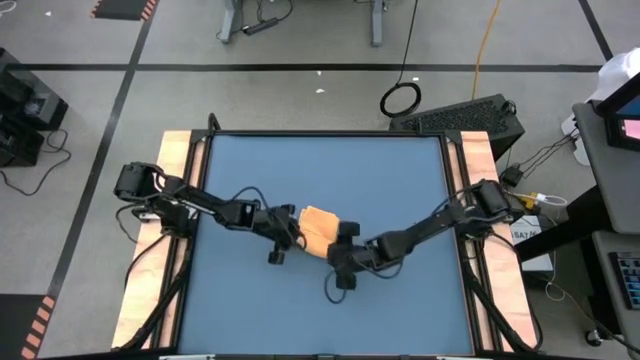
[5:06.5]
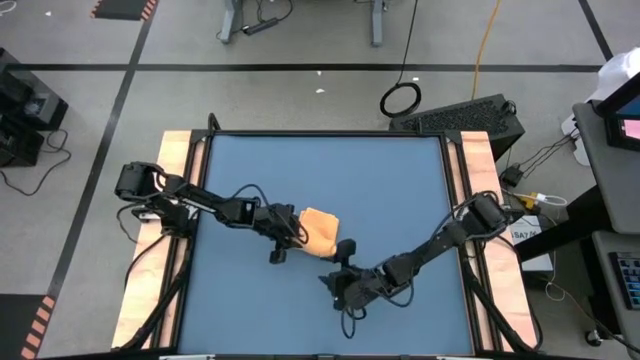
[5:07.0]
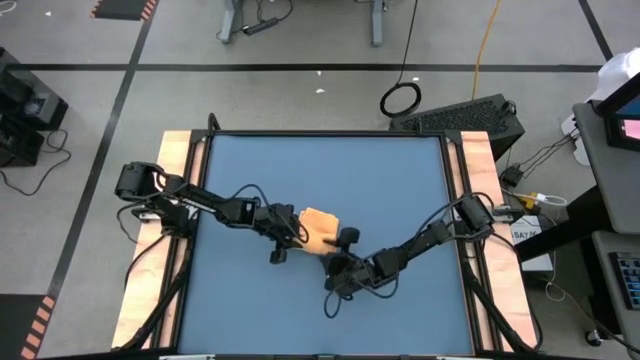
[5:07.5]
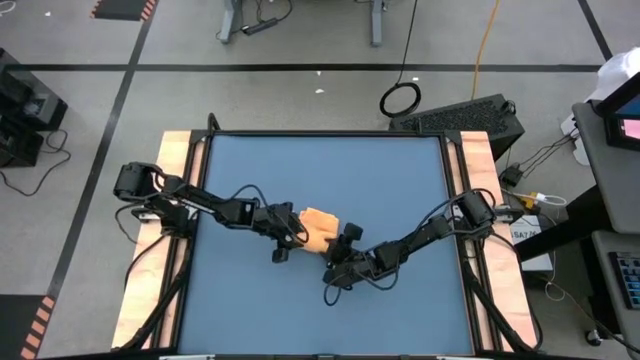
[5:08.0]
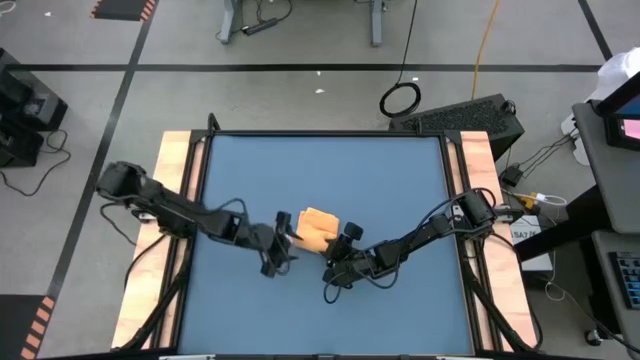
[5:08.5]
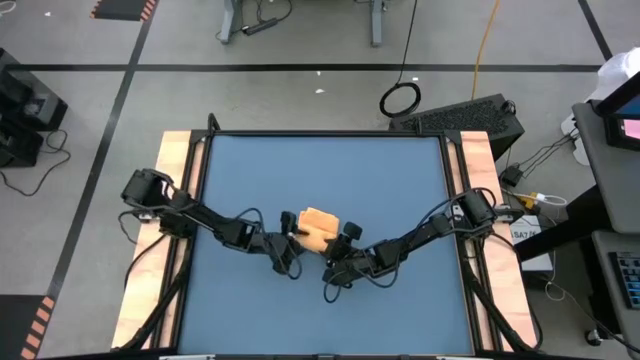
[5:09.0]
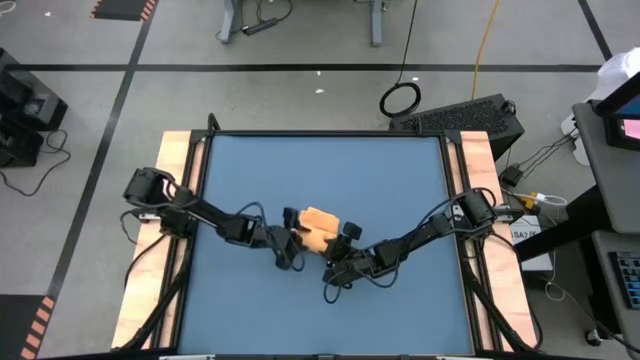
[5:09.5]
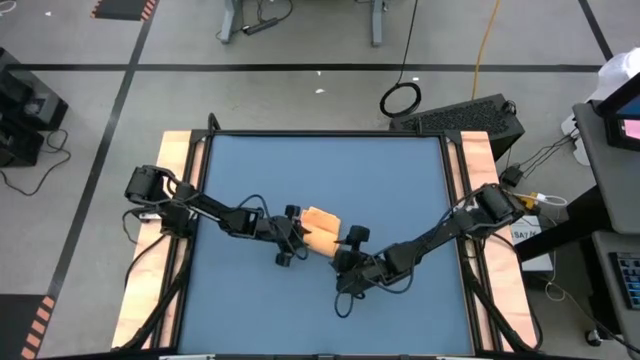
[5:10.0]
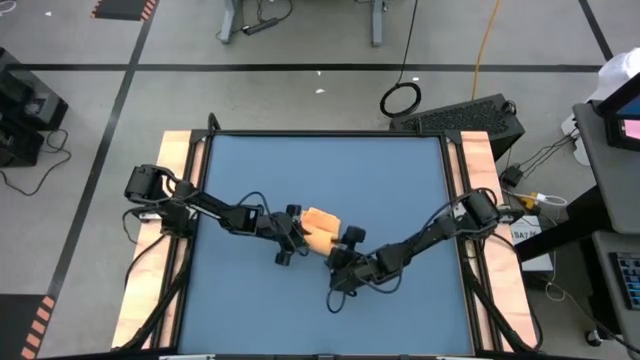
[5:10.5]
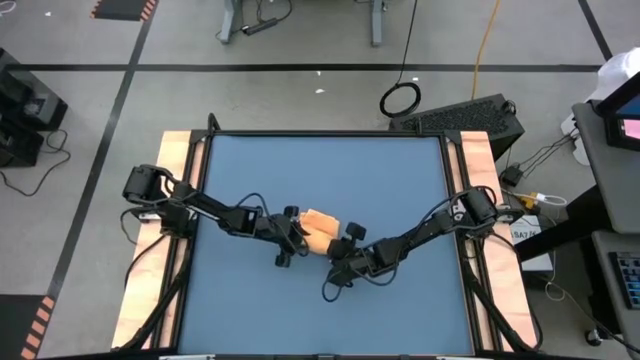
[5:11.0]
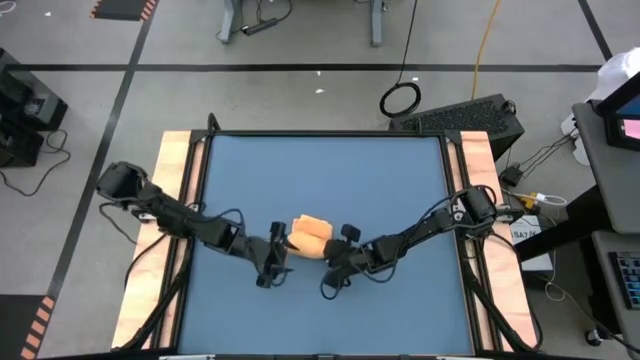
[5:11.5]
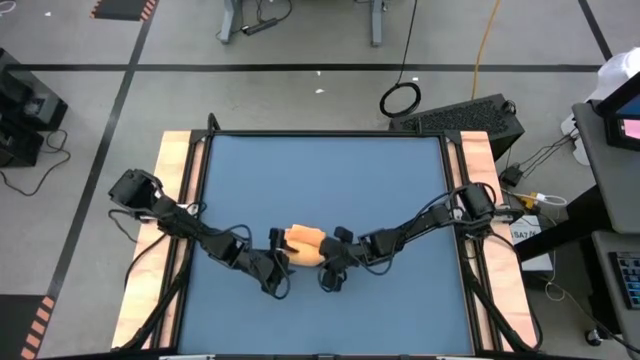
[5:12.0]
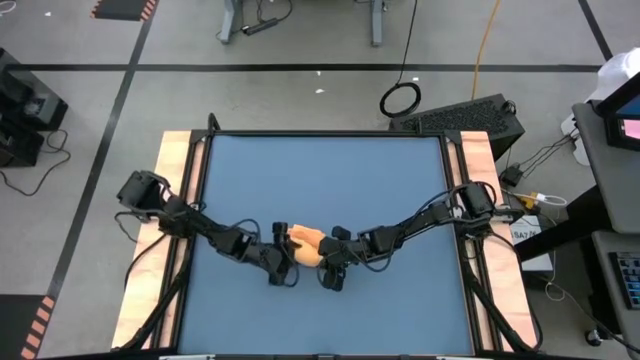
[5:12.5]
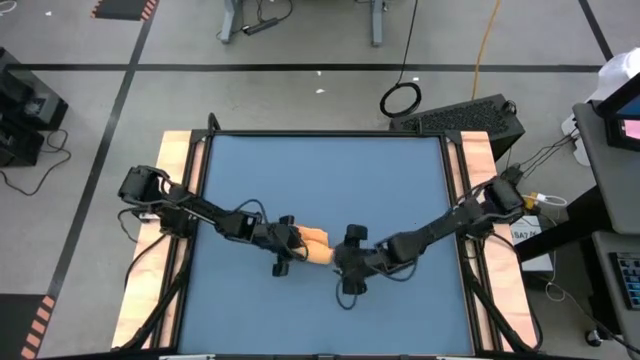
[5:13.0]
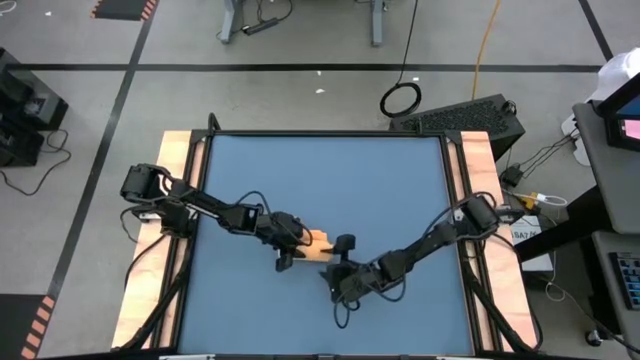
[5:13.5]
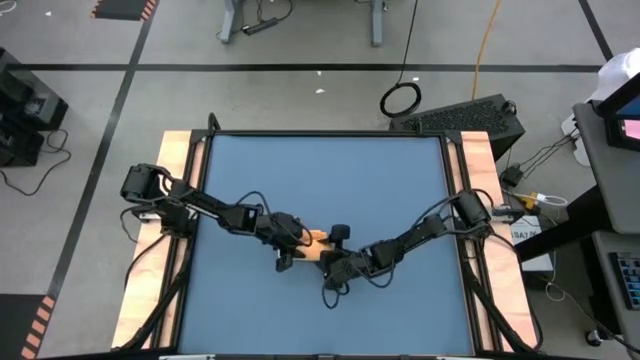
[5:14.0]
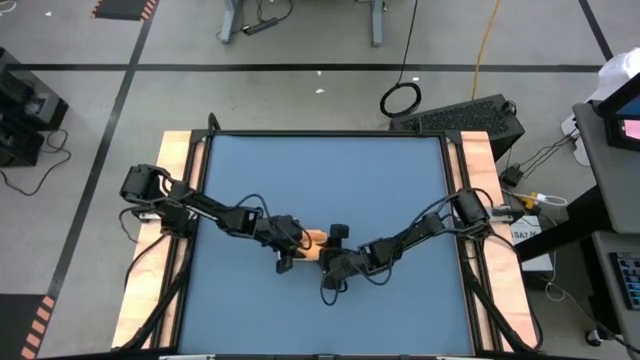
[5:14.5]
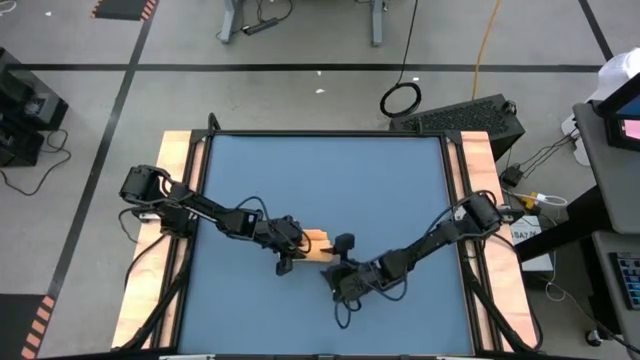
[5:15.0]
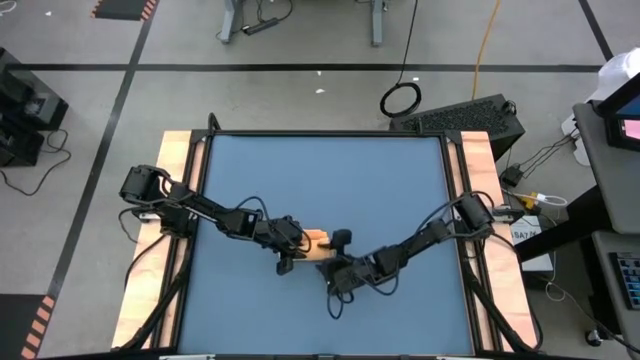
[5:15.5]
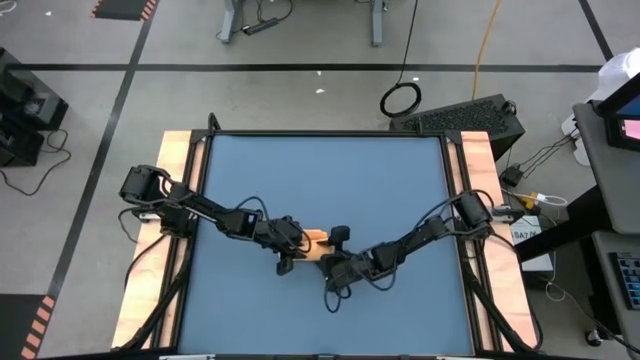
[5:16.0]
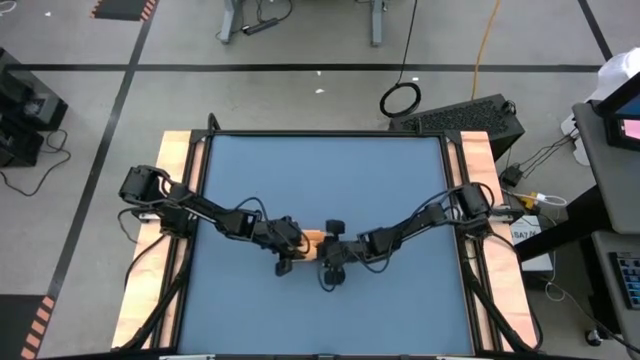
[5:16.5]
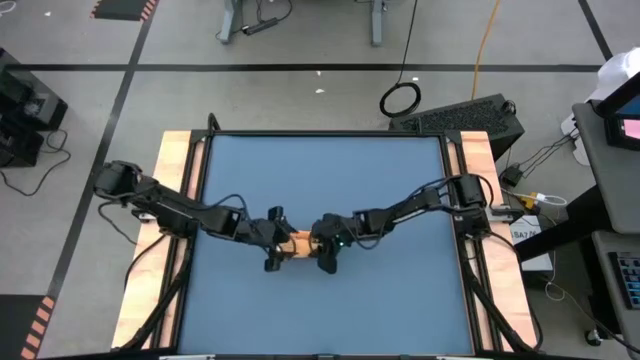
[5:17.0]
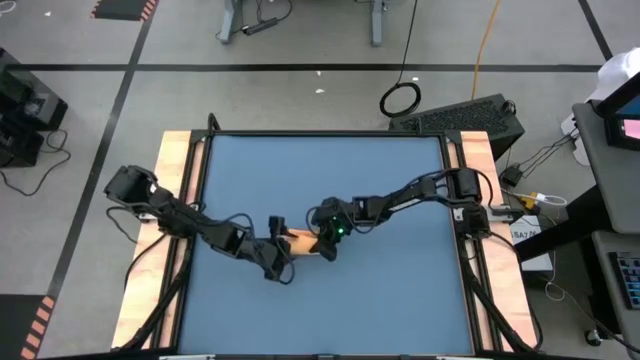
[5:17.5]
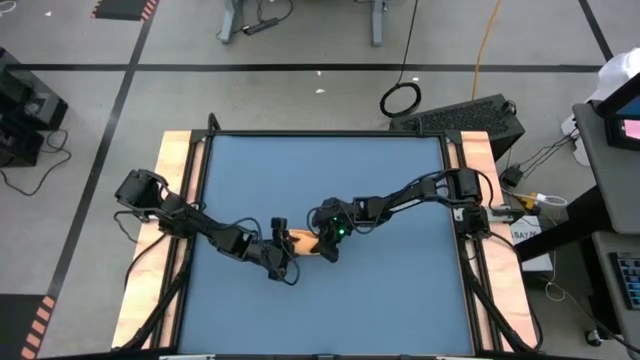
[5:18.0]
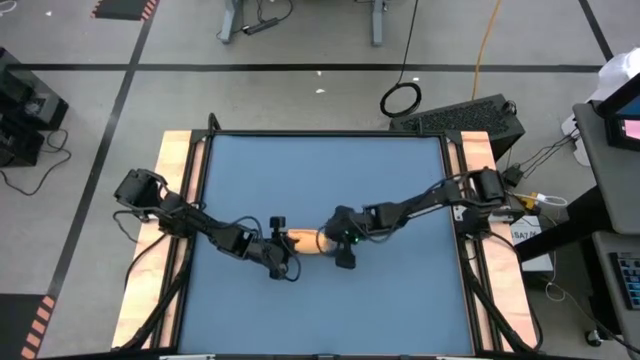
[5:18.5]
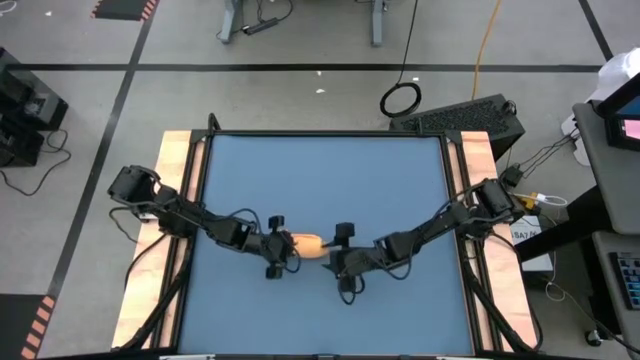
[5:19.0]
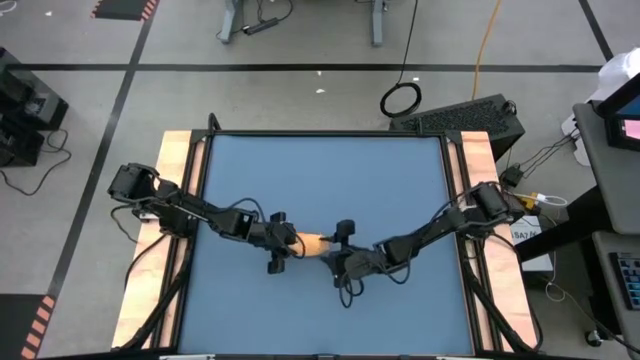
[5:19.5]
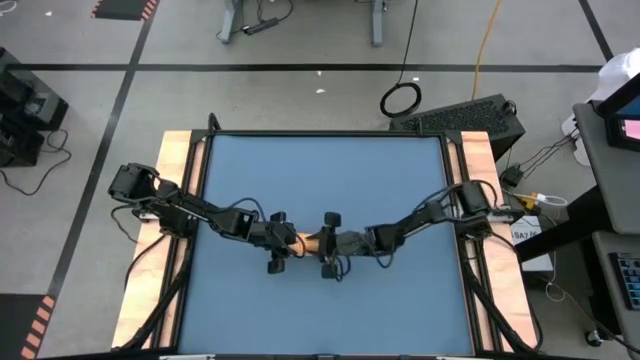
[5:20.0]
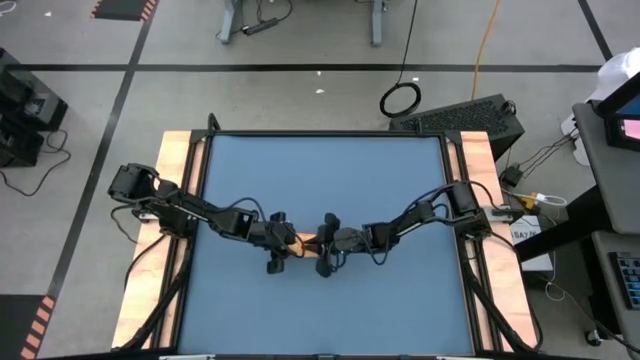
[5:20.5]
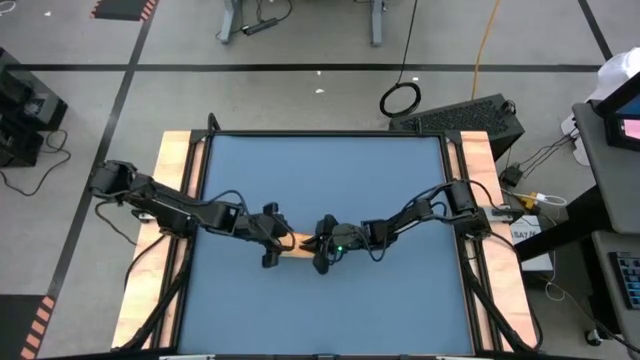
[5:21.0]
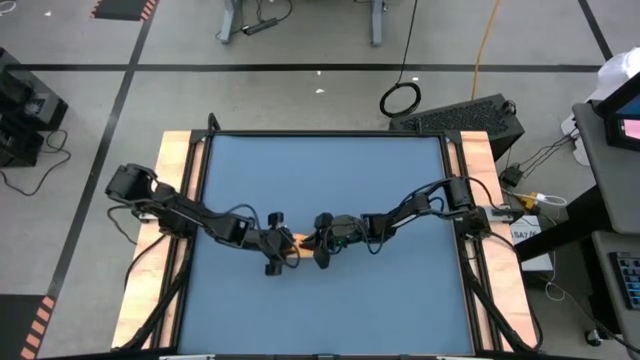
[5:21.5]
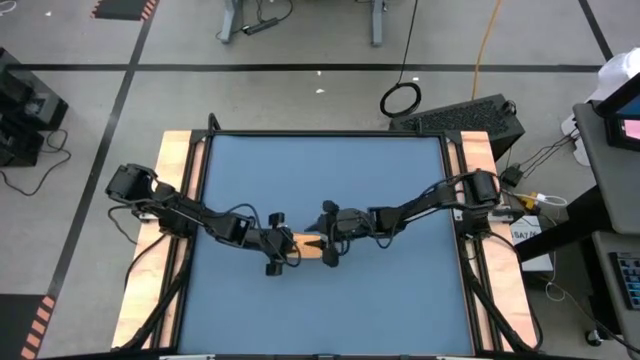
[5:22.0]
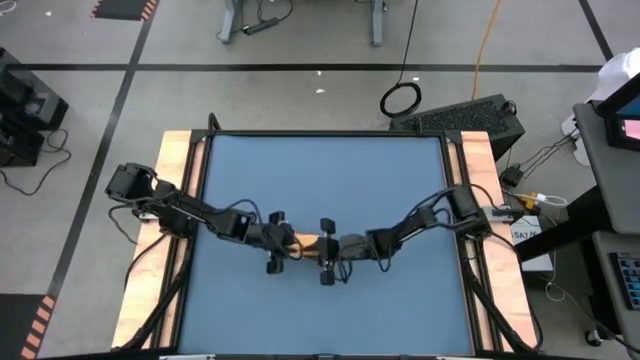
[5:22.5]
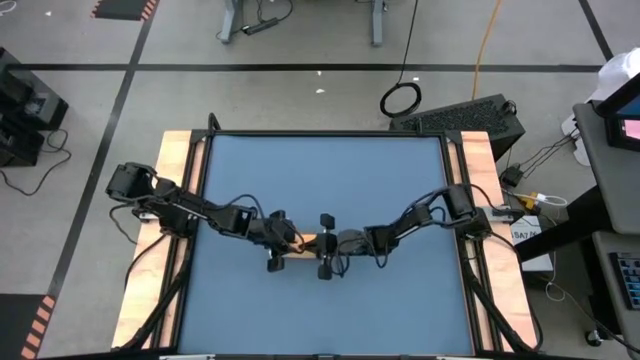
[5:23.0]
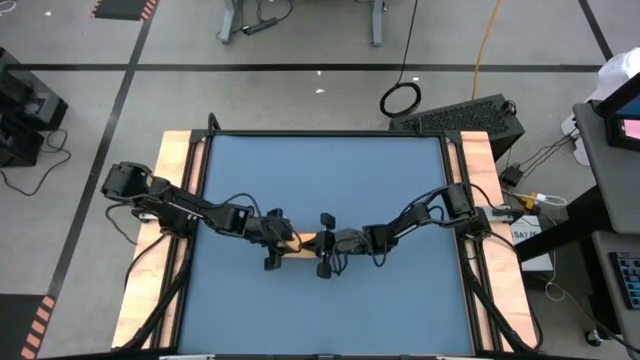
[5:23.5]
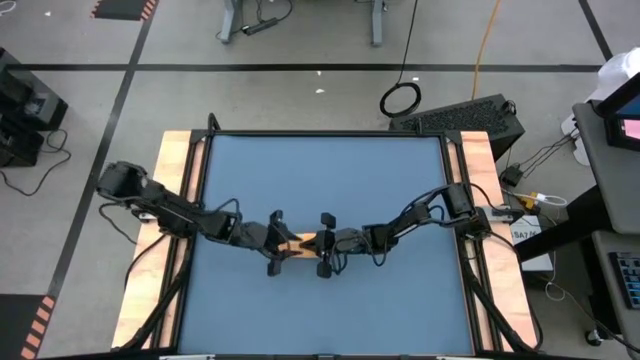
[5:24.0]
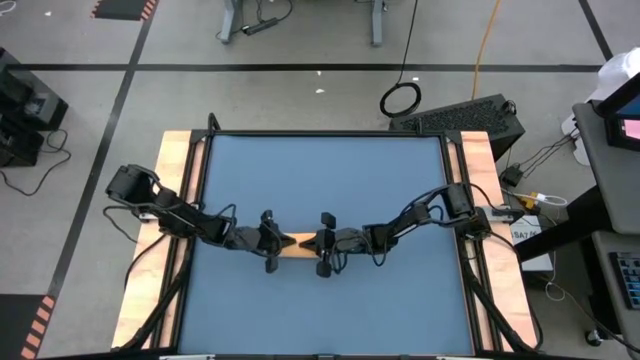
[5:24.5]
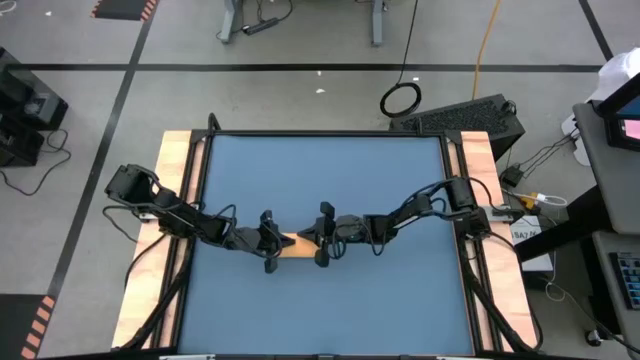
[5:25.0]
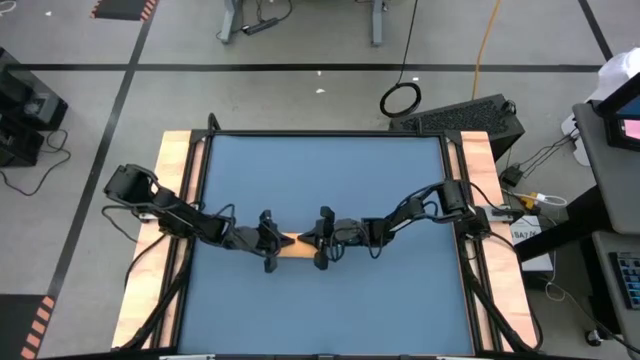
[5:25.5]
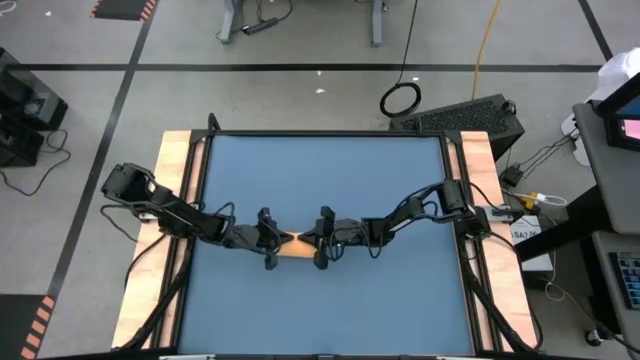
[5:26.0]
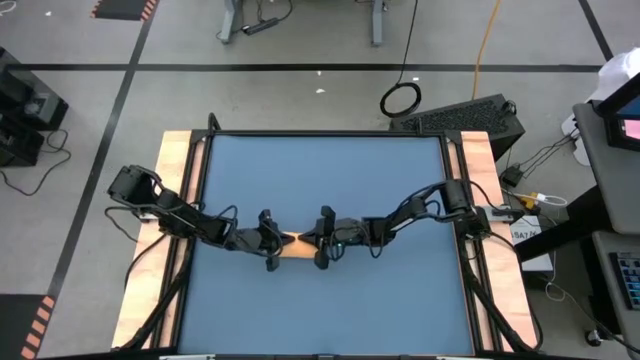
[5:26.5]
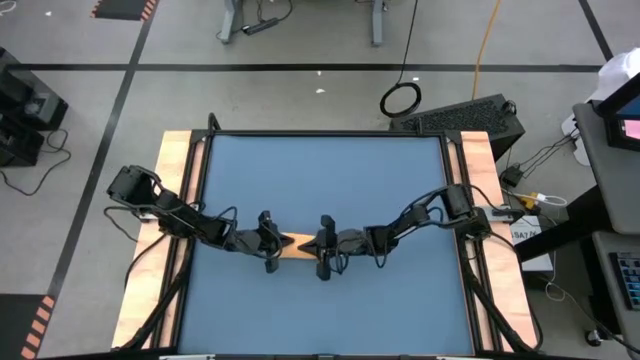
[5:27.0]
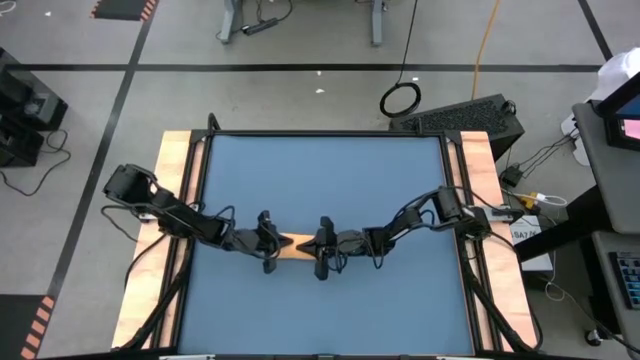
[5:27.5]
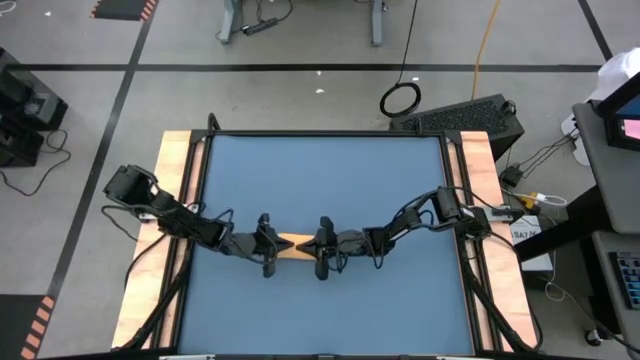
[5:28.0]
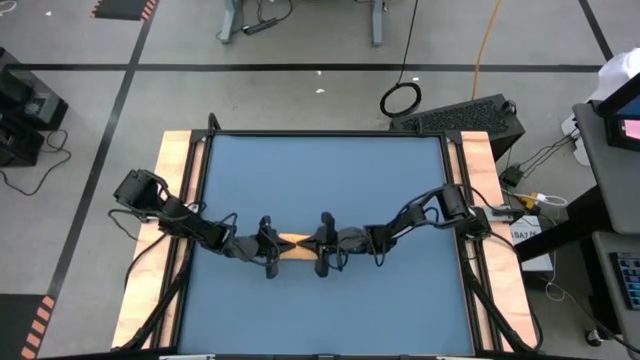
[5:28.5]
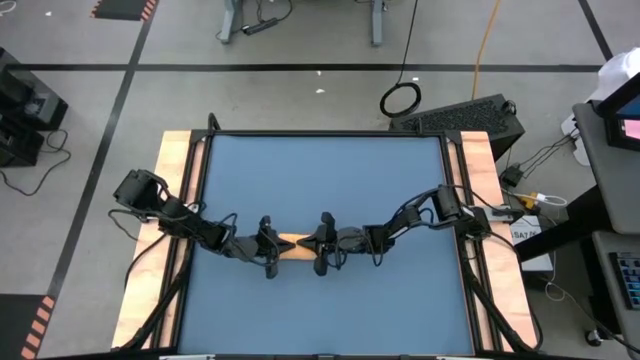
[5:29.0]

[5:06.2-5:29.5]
Task: Roll towel into tight, uniform cylinder
Roll the orange microfiber cloth
